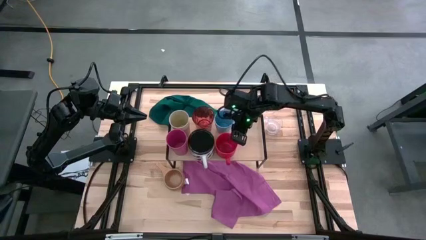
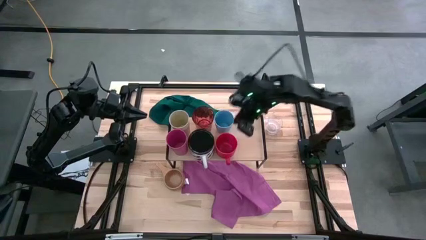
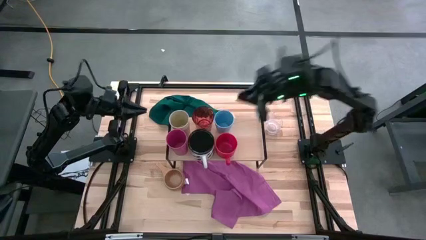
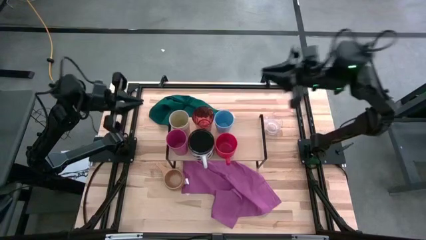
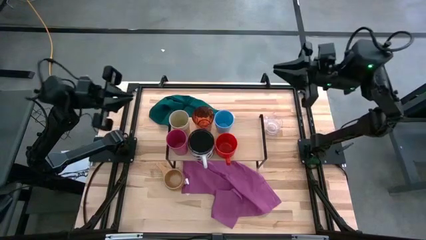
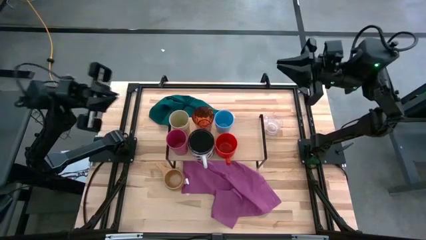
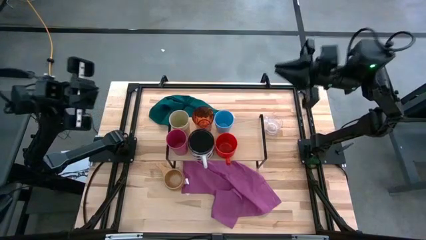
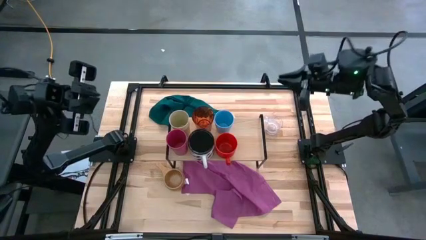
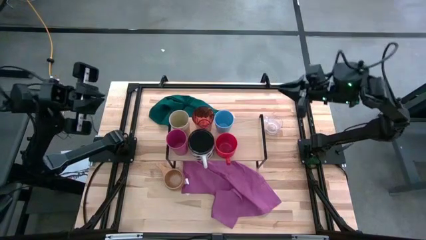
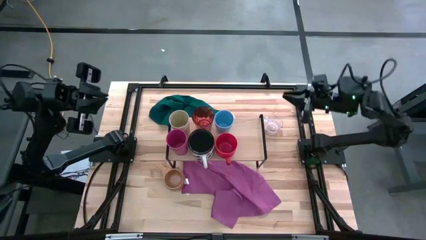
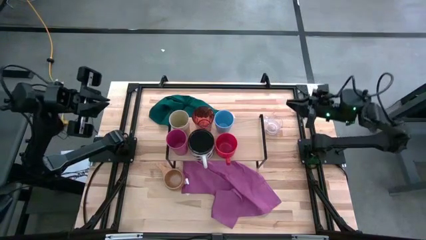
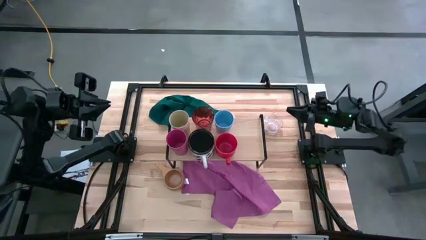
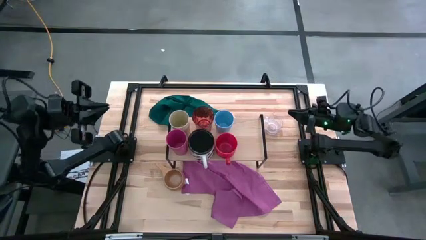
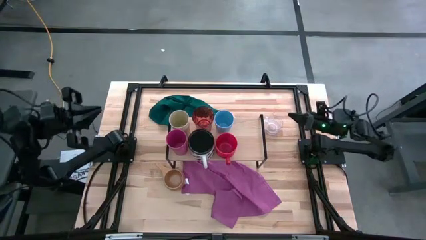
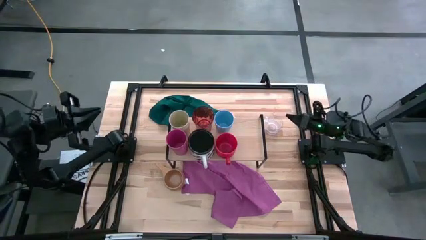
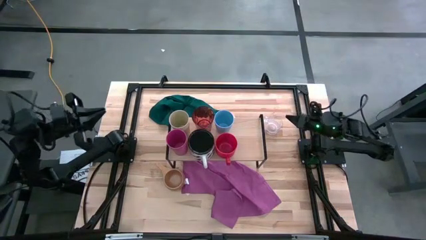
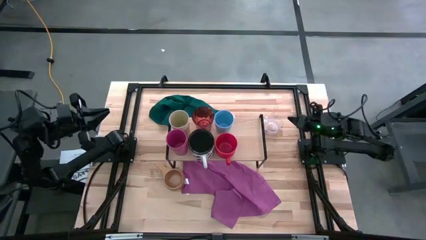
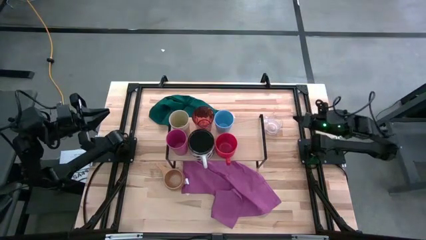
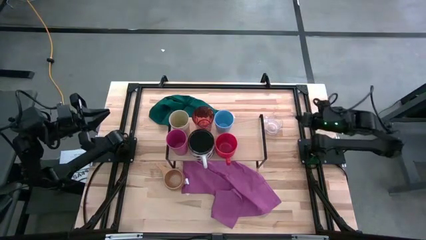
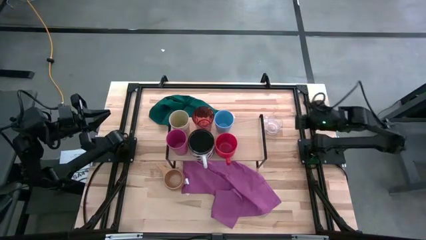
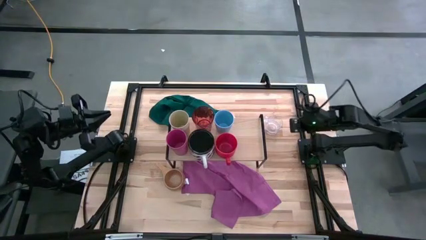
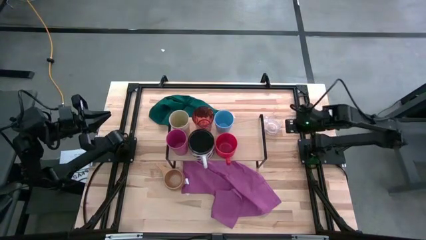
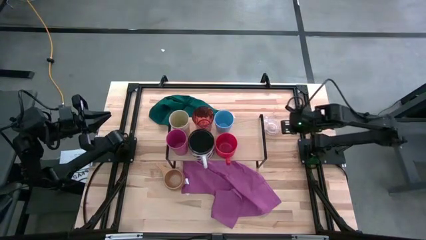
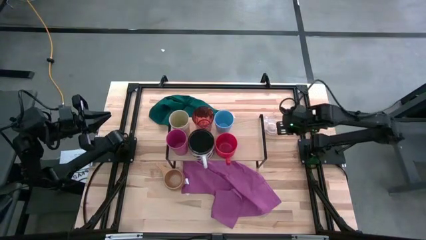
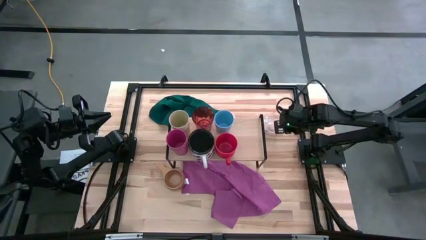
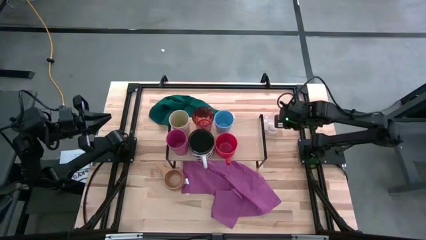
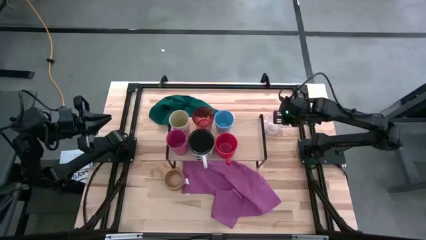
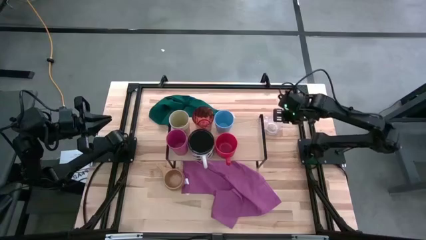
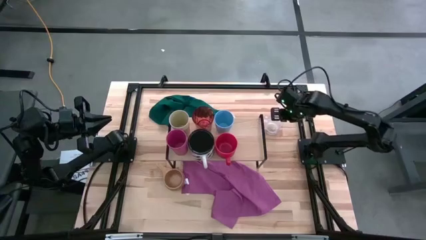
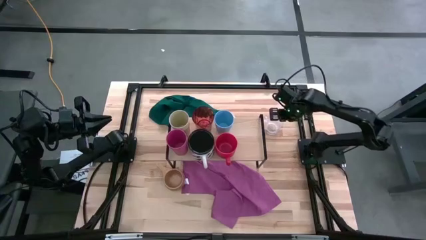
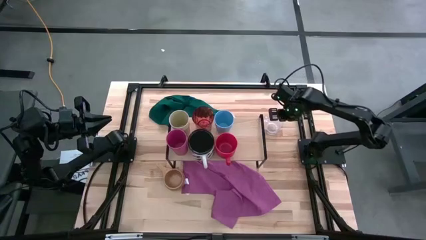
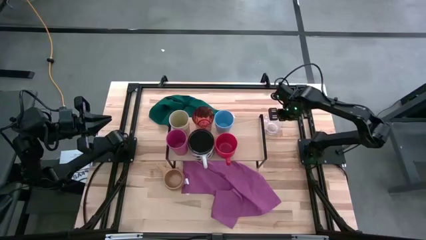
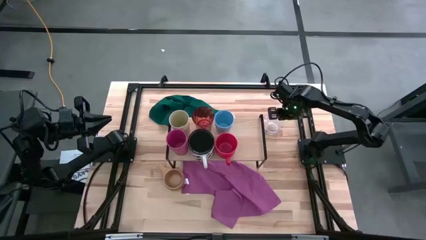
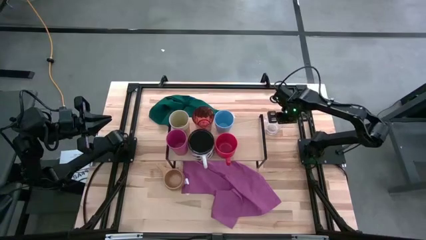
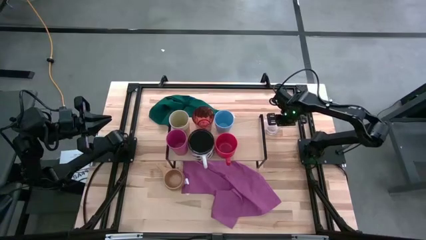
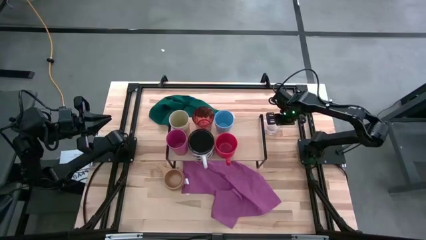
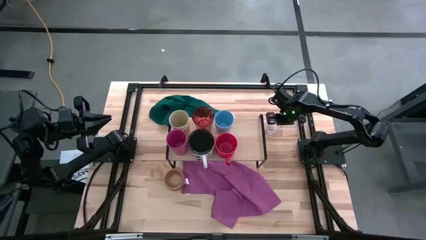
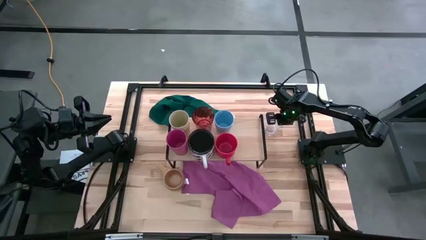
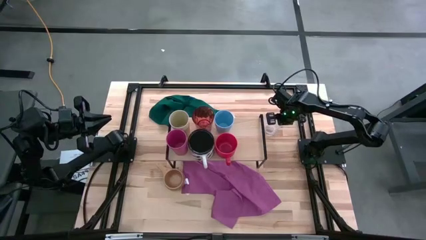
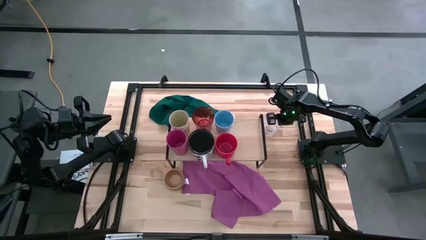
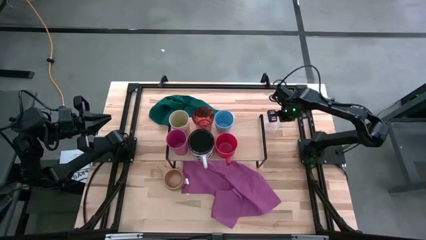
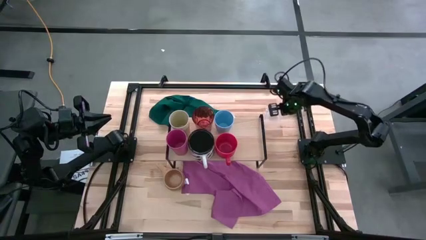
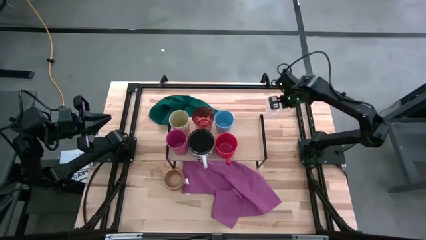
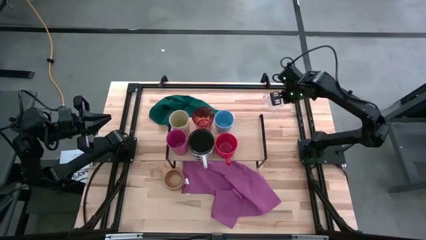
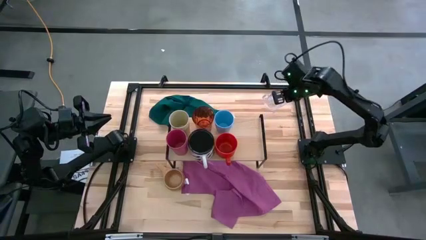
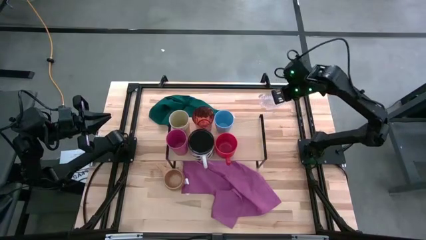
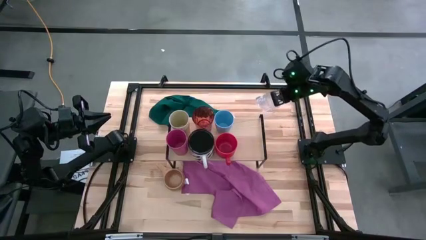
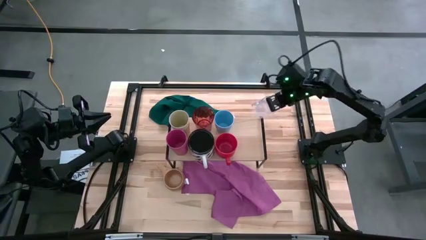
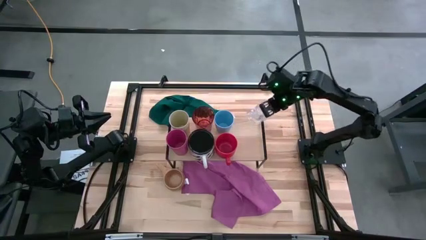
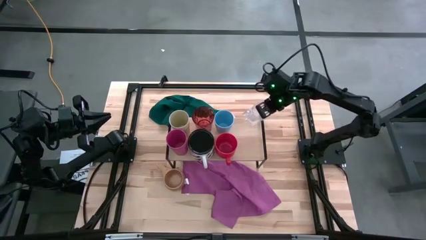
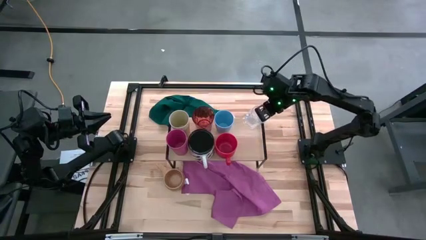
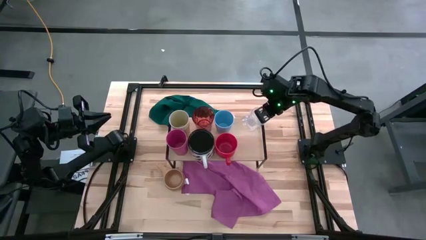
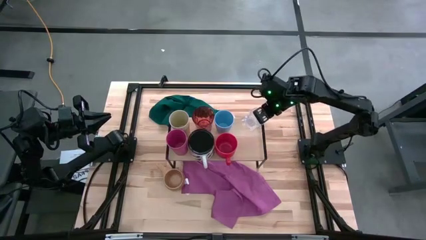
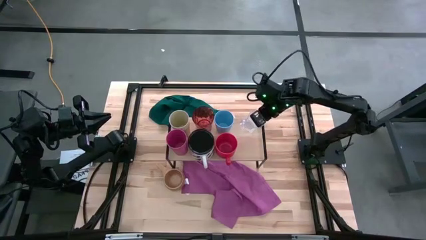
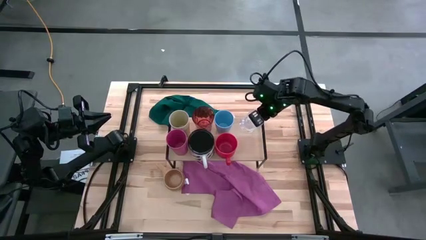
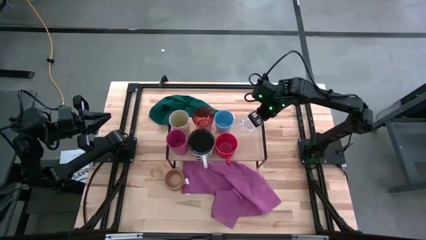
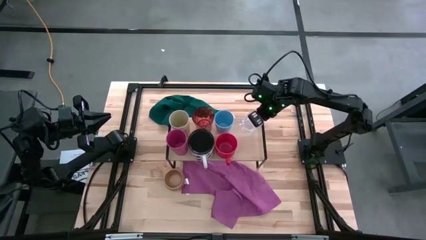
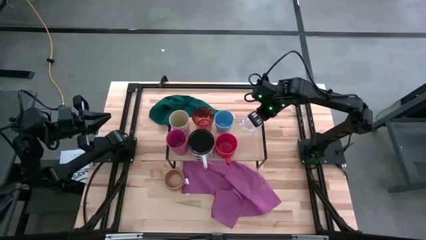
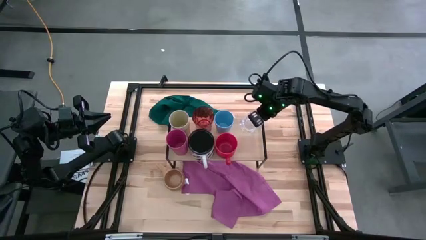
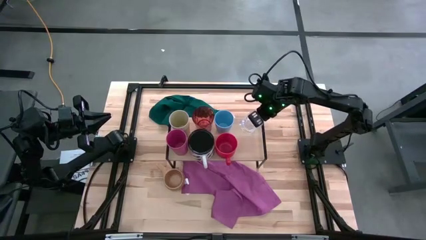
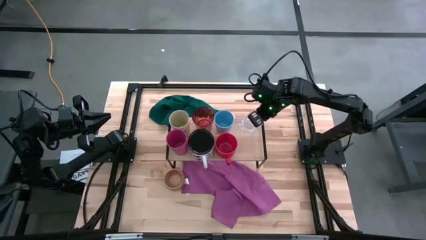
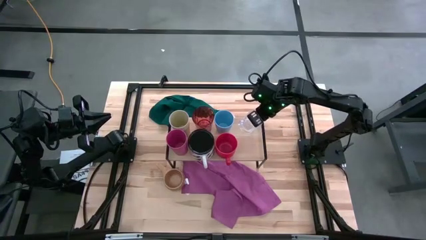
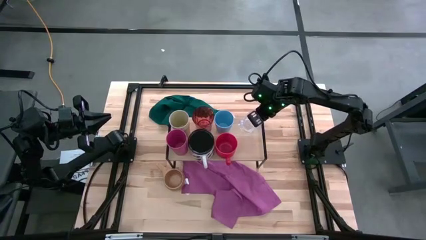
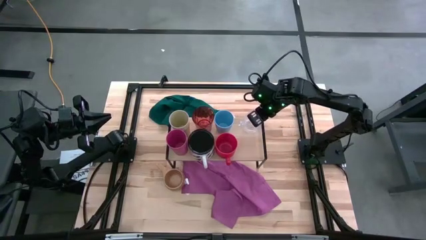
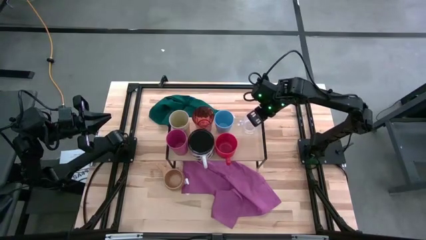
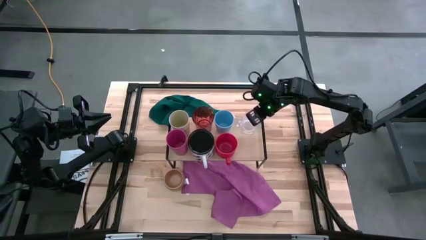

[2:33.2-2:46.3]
Task: Stack small to large cups/mugs on shelf
Put the transparent mug on the shelf

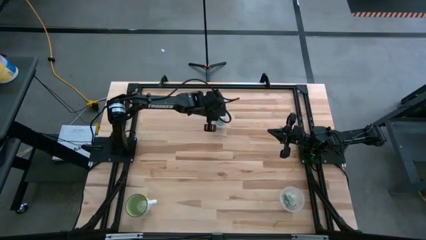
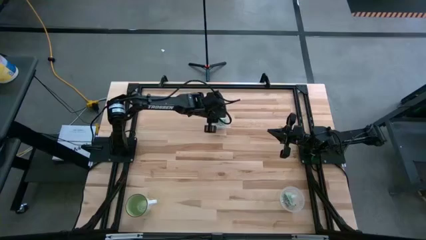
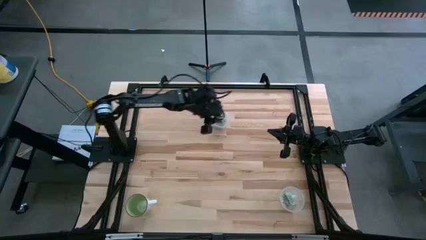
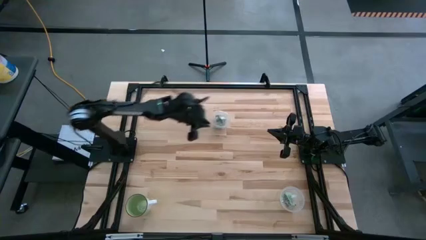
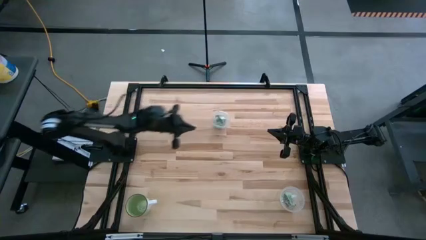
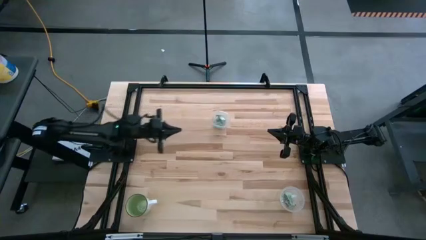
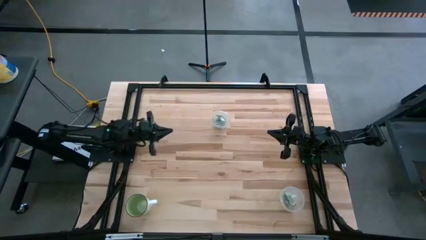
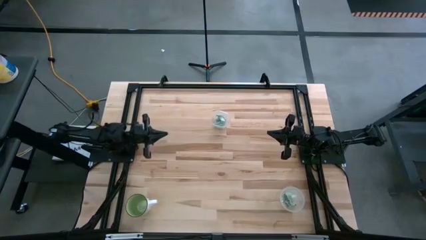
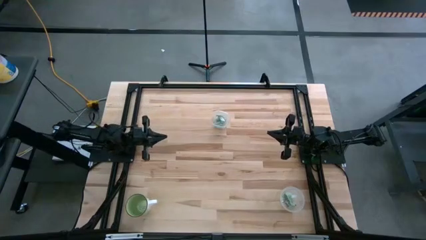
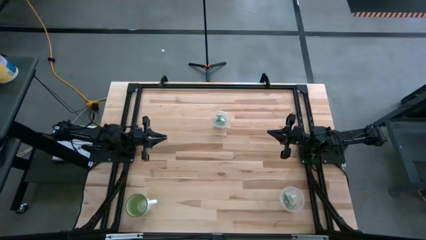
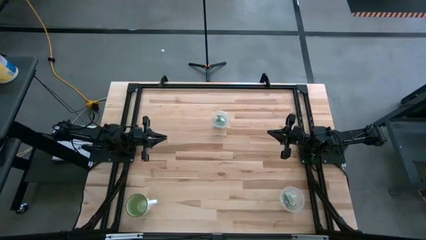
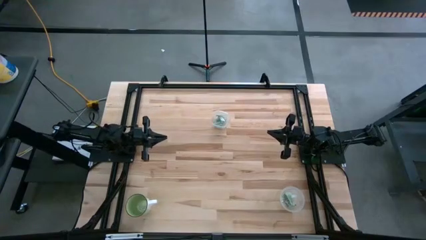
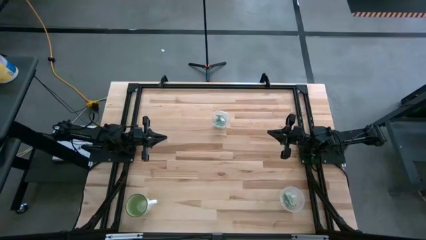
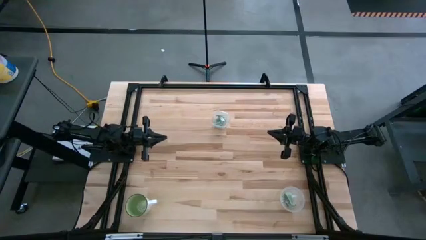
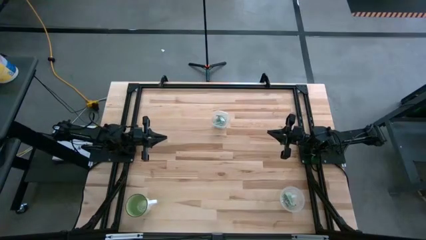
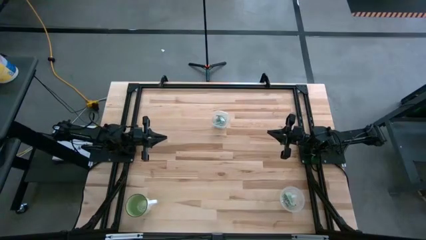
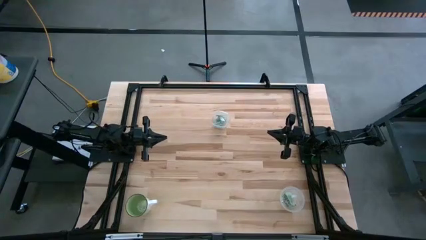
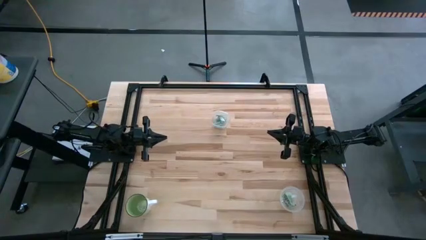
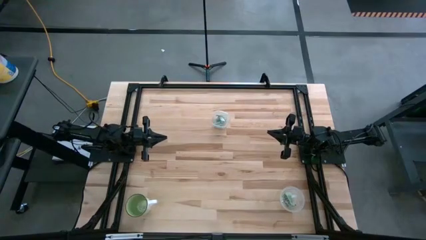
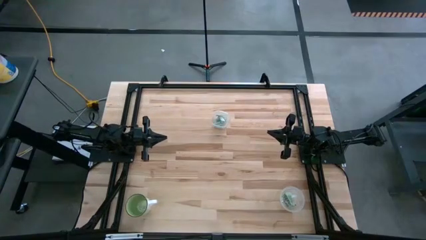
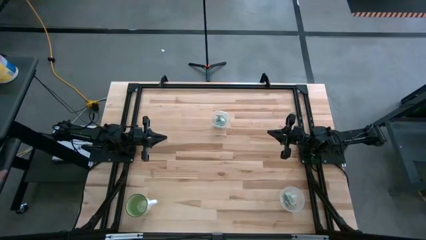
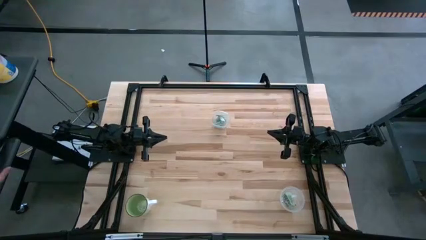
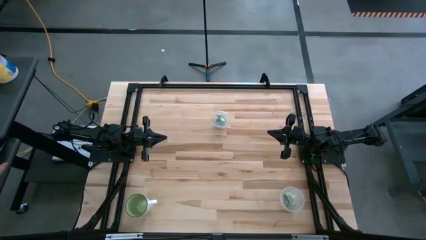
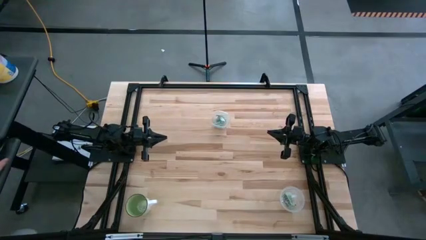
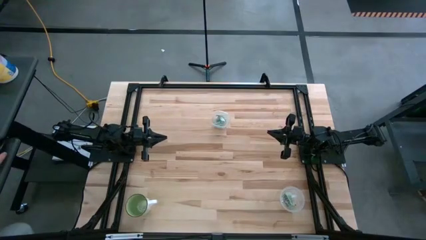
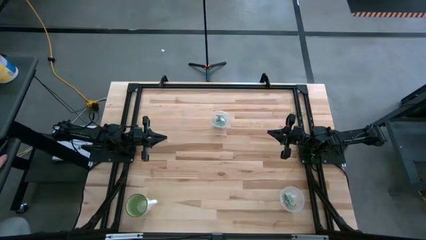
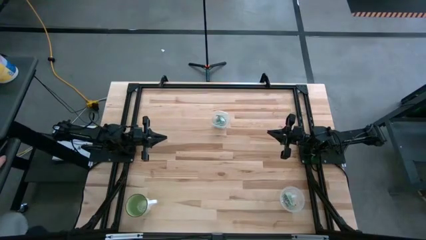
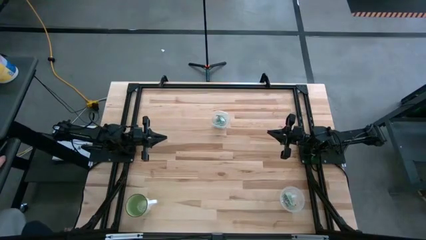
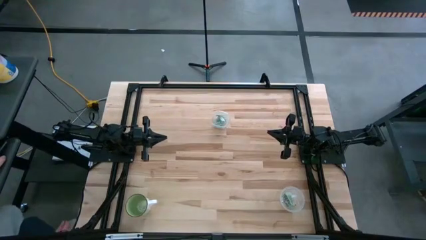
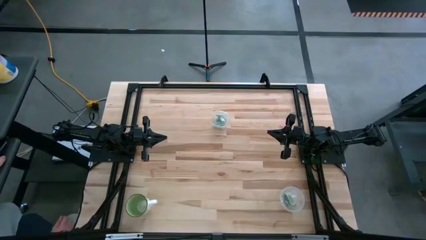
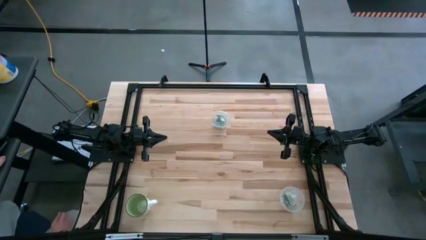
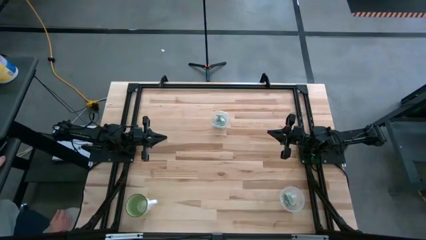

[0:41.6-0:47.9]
Task: Pick and place items into bin
Return to Home Position
